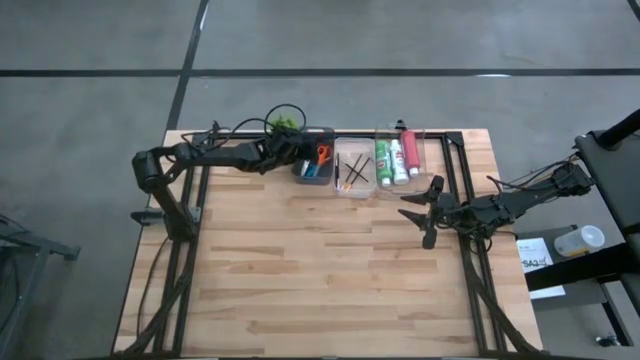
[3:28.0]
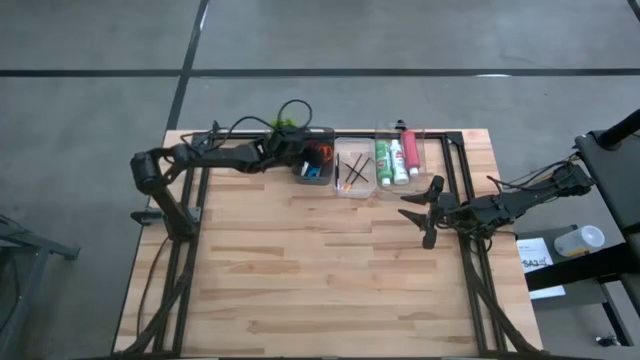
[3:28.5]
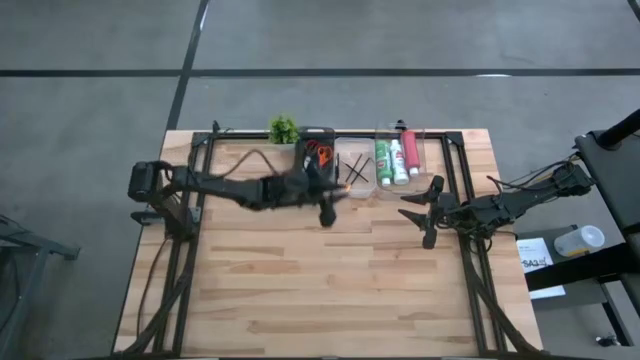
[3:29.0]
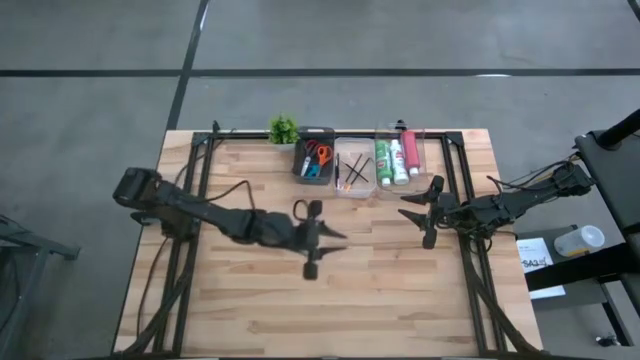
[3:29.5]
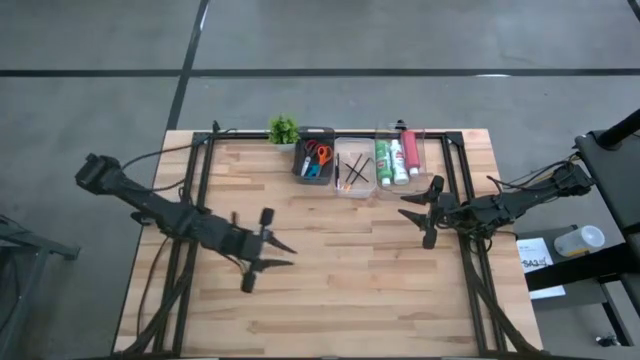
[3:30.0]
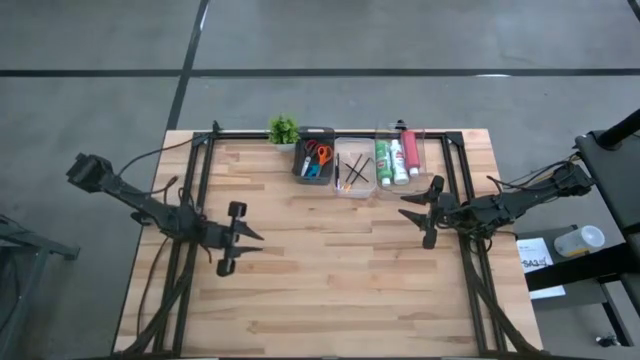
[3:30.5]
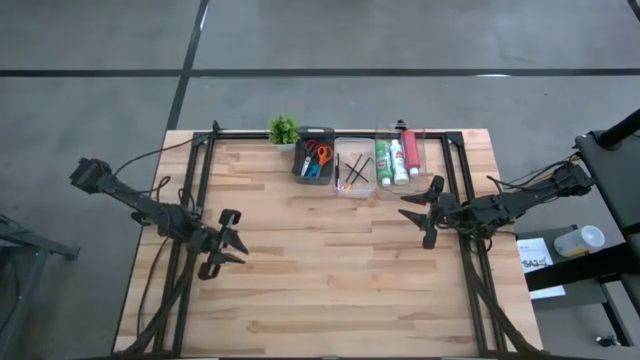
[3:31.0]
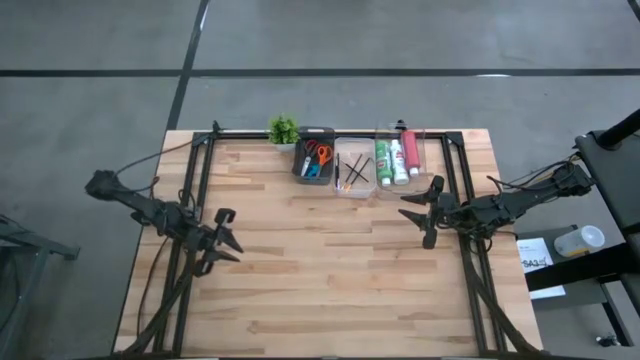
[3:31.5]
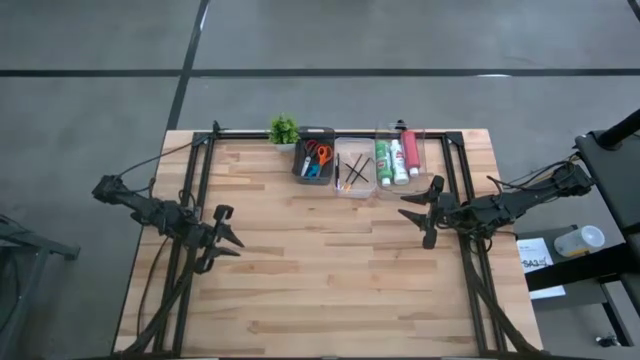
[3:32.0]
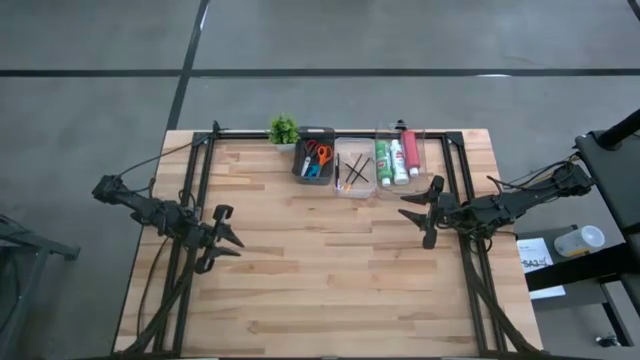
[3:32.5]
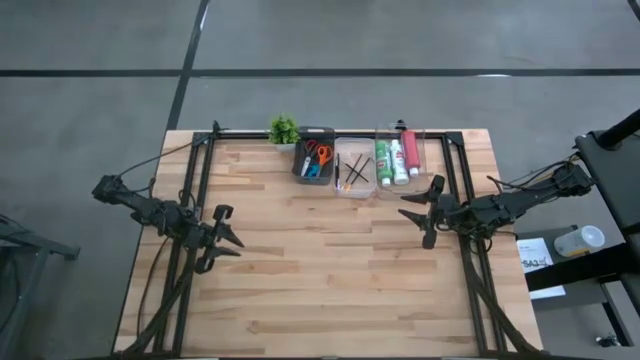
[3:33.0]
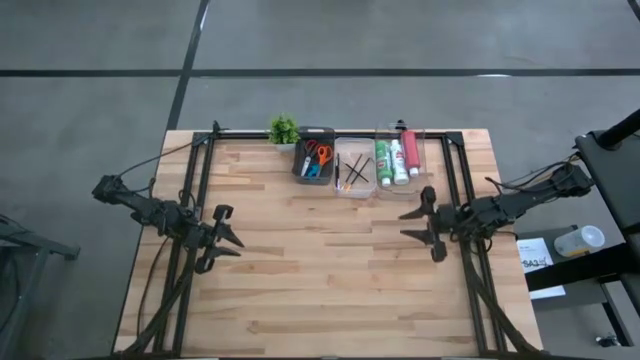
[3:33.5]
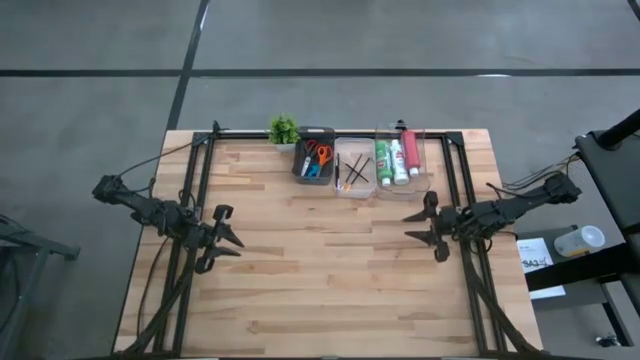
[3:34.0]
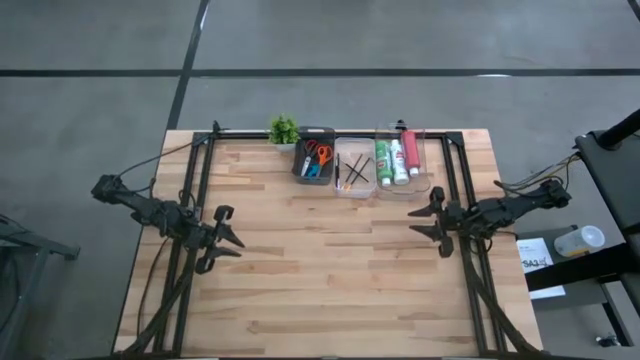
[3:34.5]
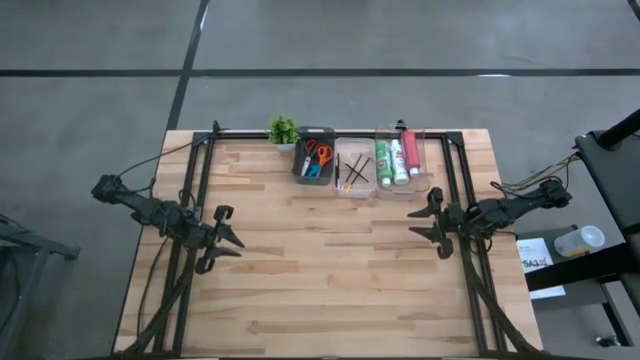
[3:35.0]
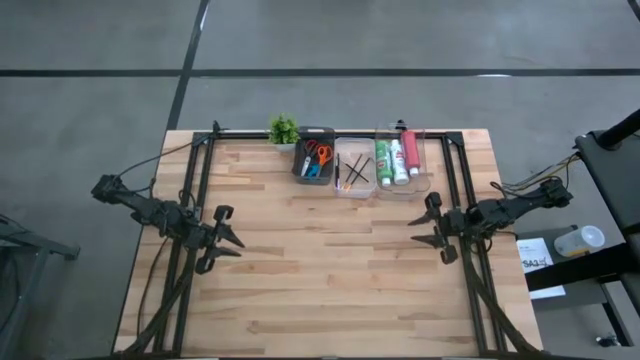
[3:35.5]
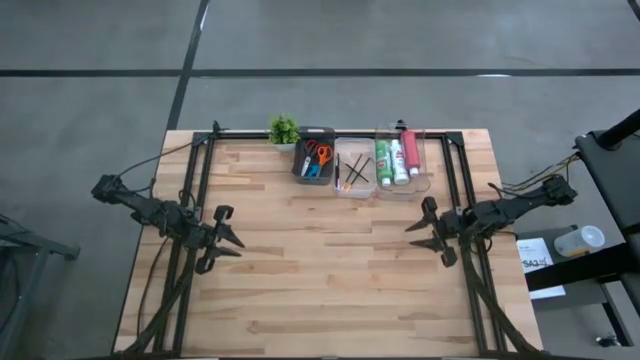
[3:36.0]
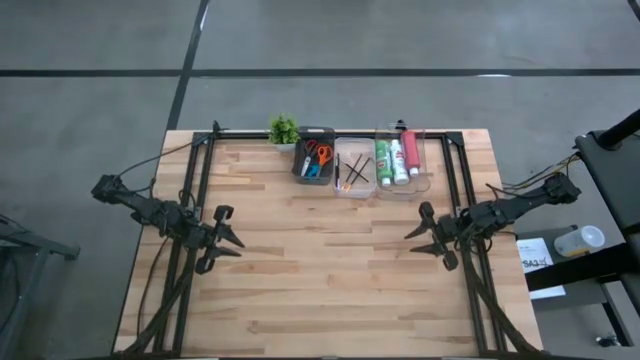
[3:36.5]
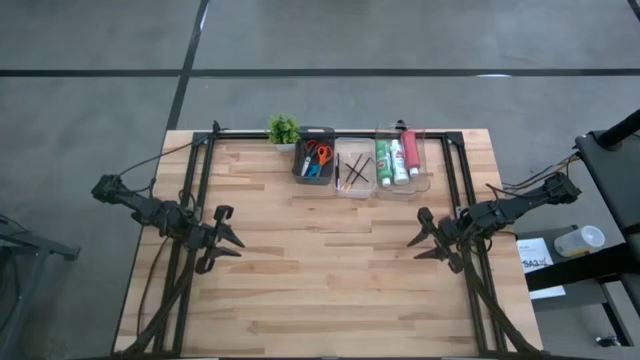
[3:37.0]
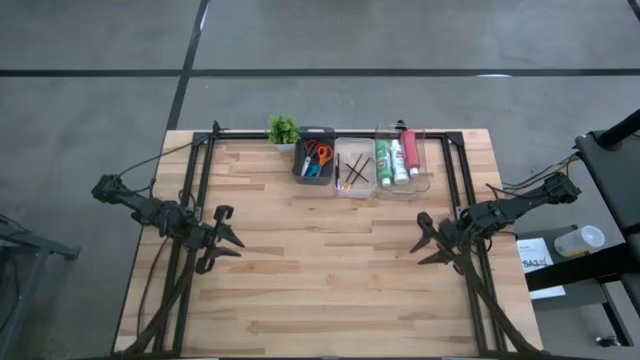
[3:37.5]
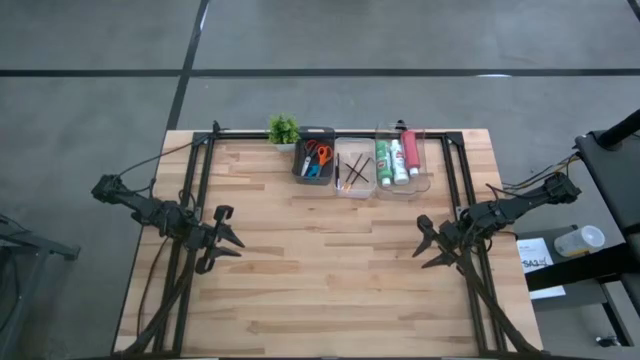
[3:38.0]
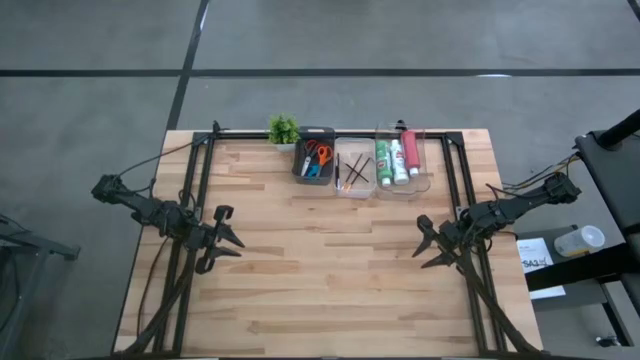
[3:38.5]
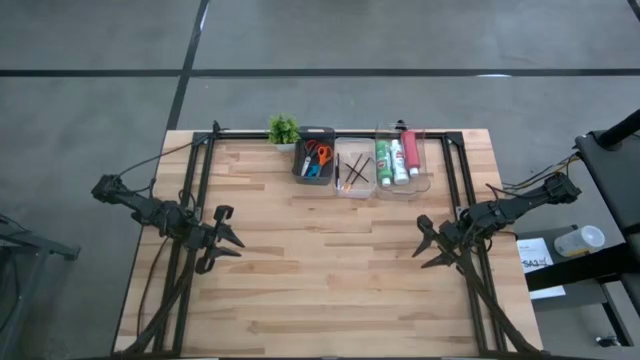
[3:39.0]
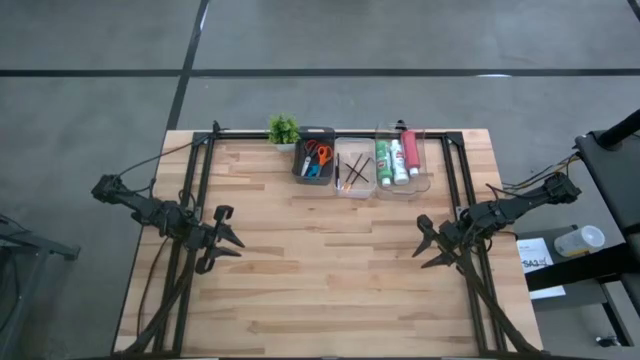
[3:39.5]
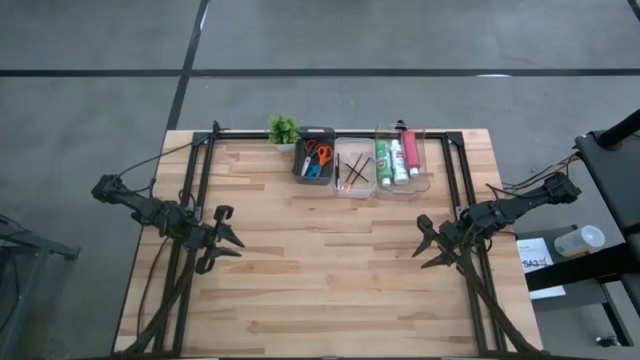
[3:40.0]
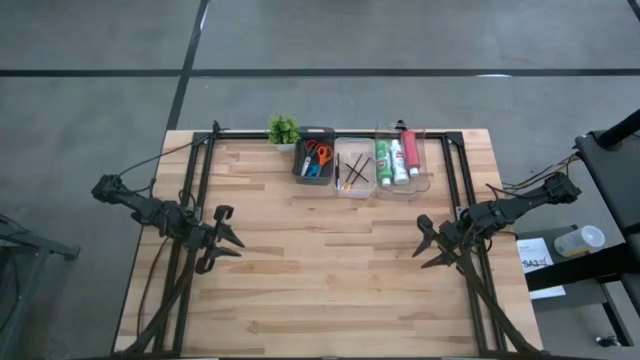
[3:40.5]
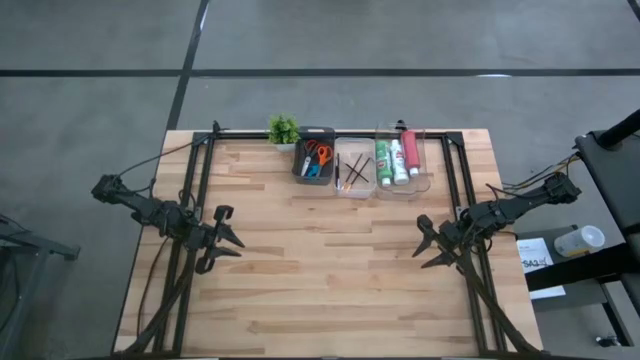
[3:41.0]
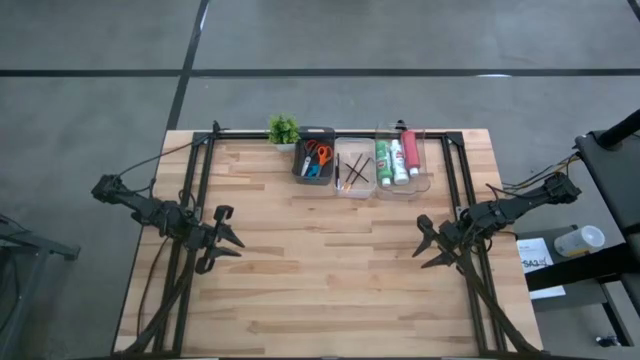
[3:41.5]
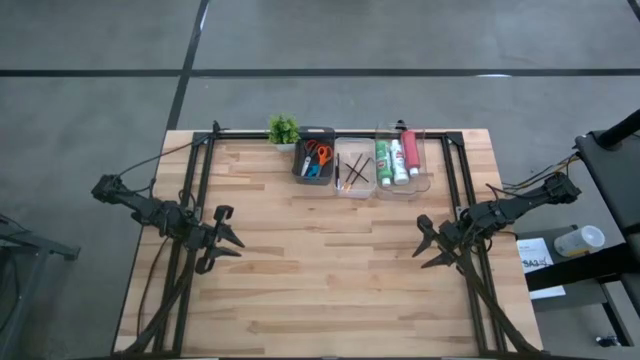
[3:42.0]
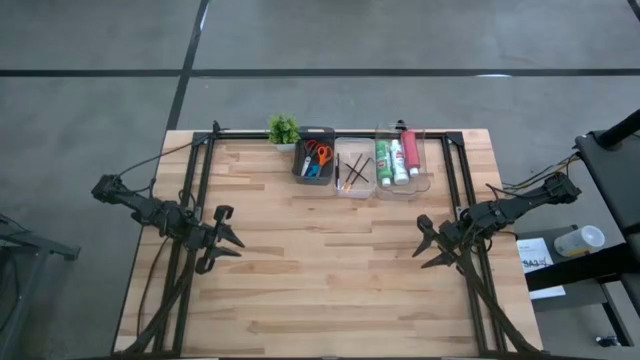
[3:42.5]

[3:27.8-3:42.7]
Task: Pick & Place Paint Supplies
Return to Home Position

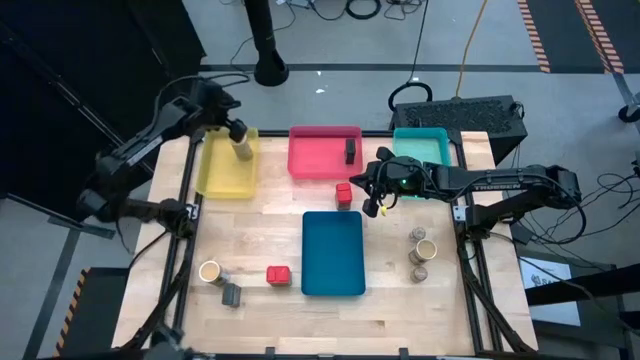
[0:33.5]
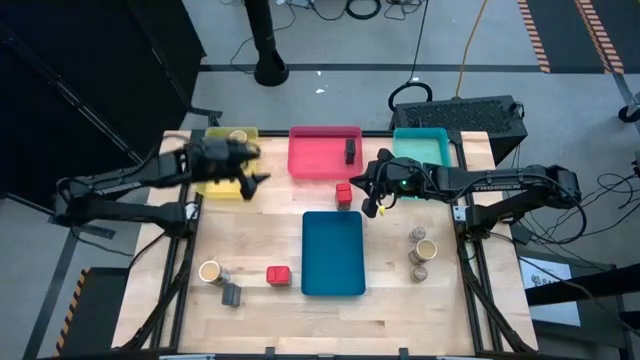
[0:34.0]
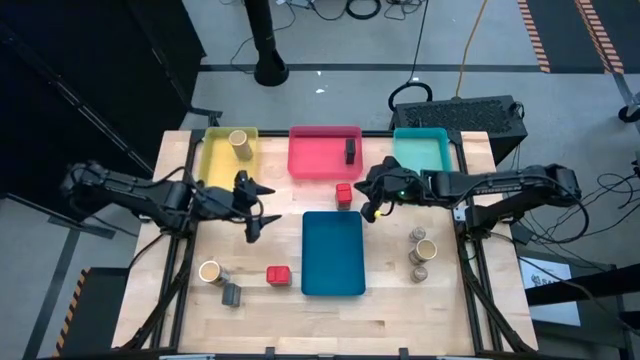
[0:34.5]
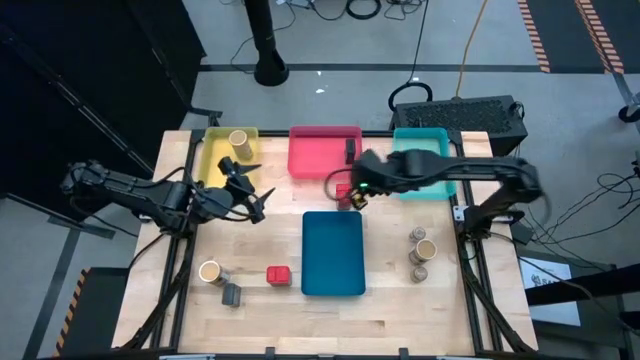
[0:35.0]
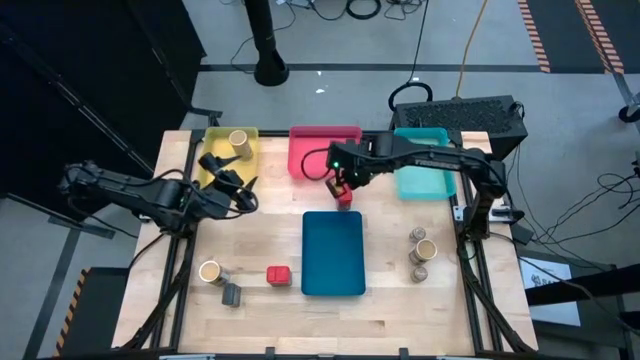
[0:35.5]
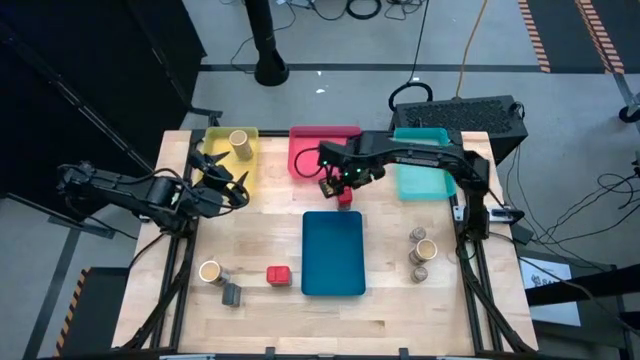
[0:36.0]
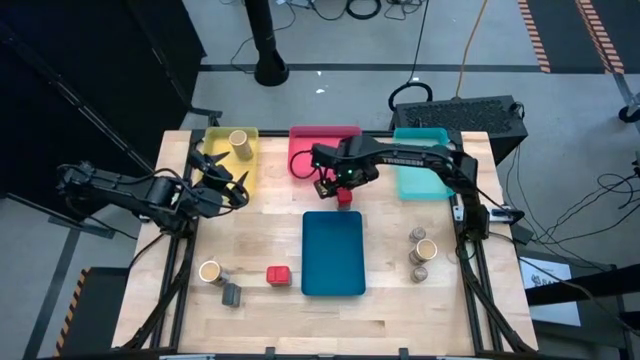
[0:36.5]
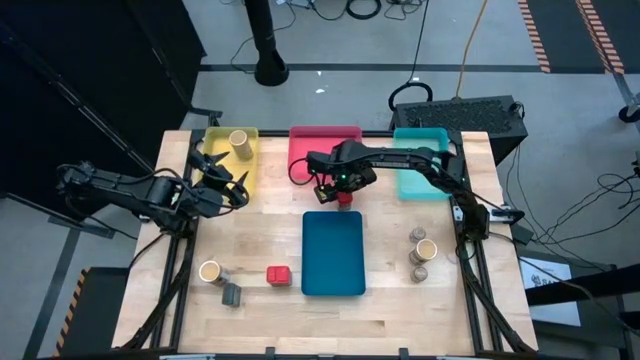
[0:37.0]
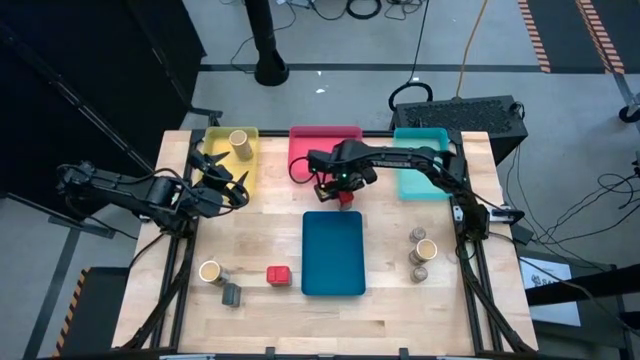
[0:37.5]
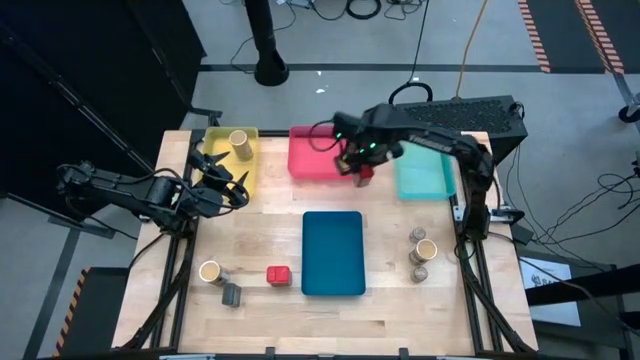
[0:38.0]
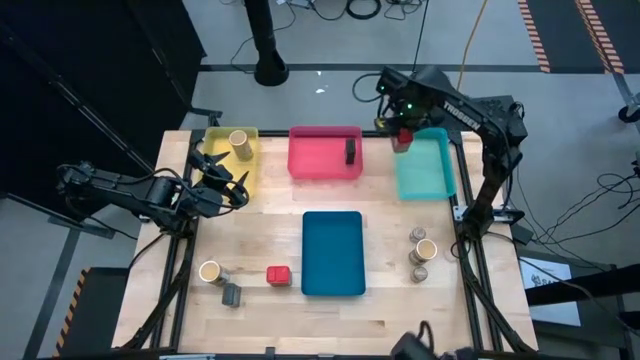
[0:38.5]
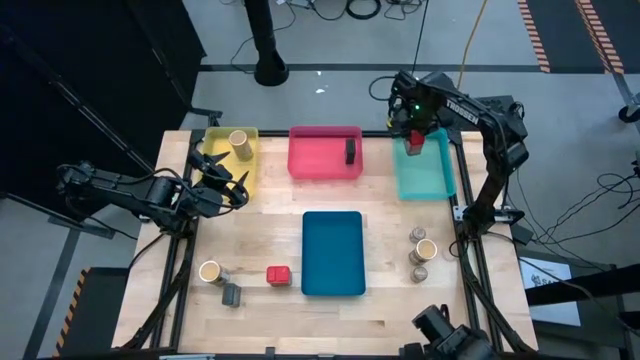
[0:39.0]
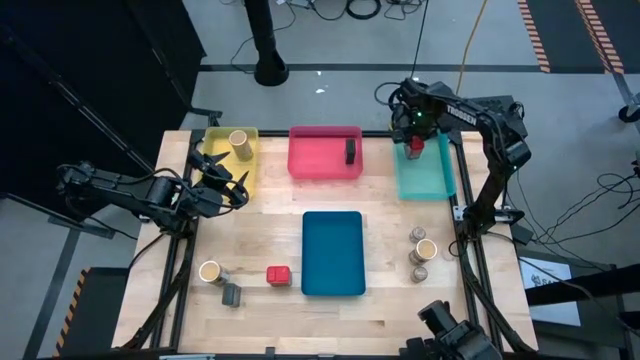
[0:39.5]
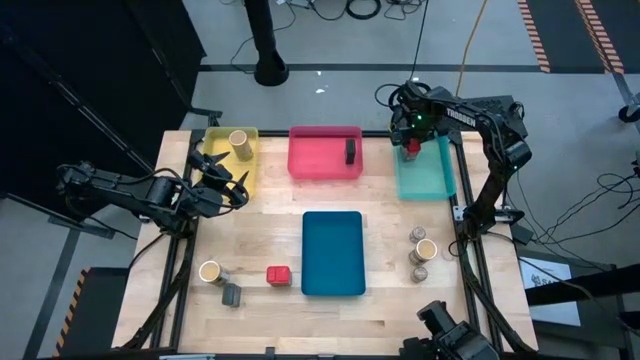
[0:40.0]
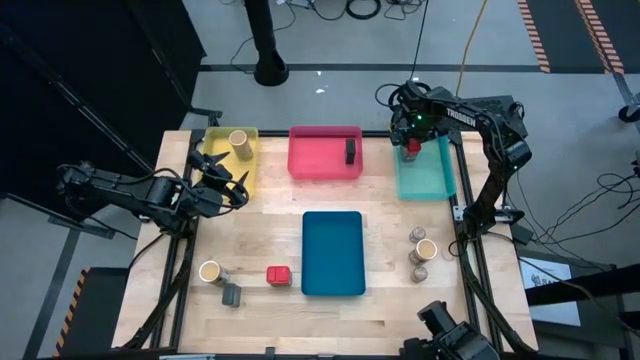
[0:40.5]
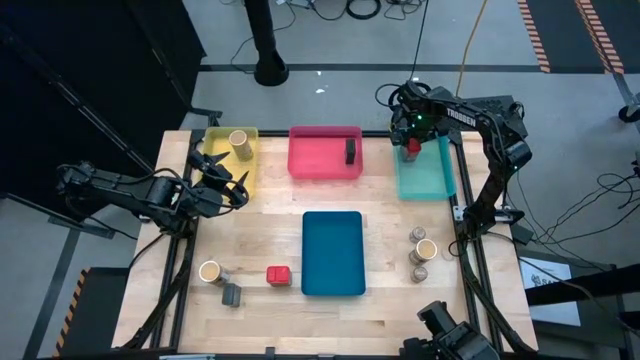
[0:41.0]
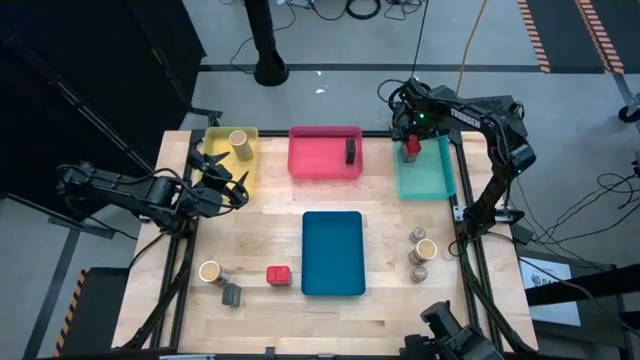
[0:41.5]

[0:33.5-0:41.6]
Task: Sort spices by type
Put the top red seasoning can into the green bin
